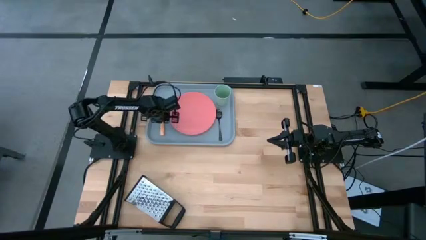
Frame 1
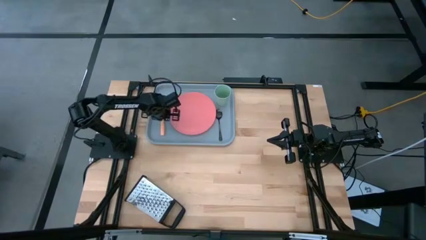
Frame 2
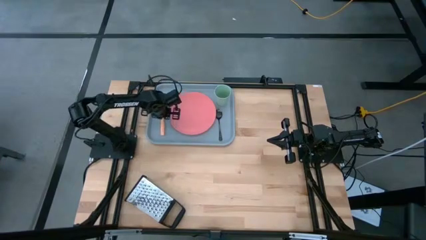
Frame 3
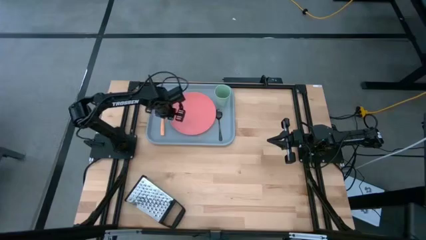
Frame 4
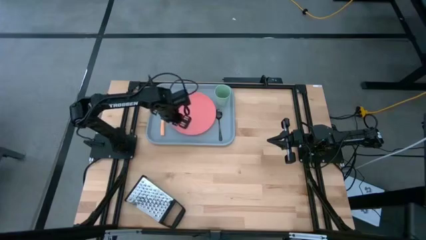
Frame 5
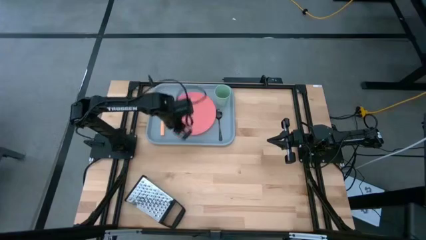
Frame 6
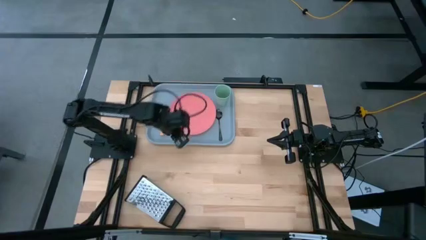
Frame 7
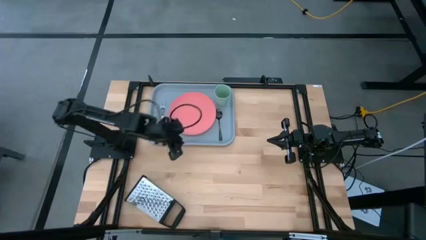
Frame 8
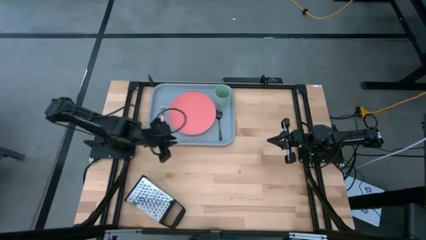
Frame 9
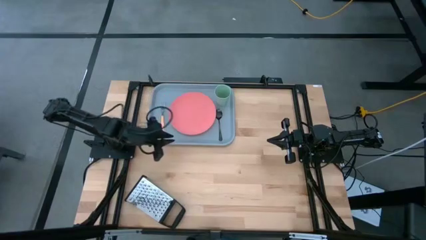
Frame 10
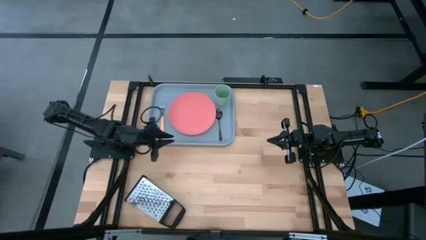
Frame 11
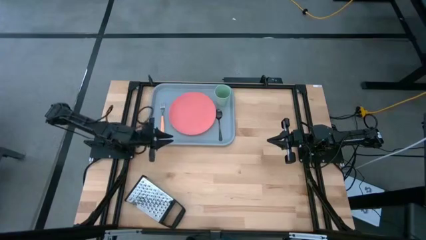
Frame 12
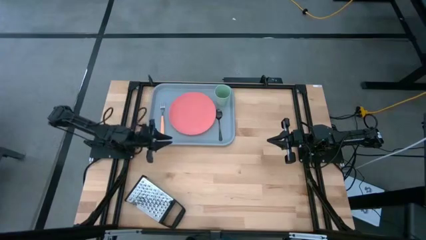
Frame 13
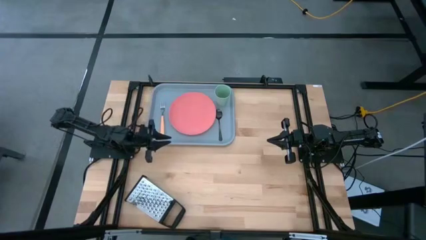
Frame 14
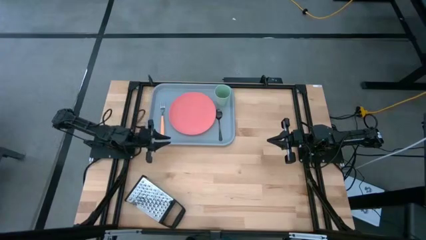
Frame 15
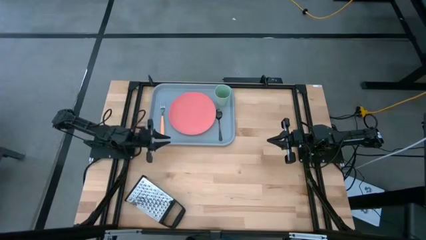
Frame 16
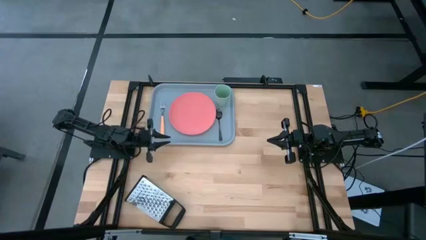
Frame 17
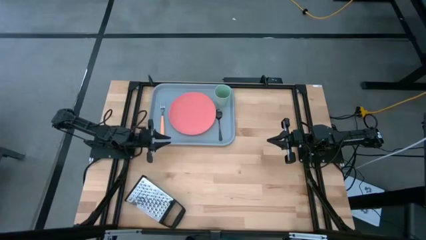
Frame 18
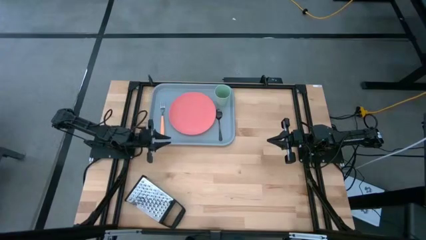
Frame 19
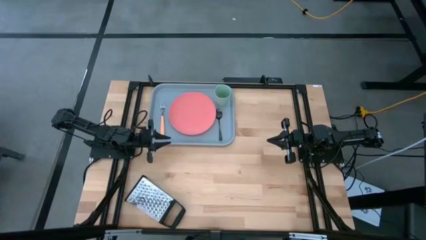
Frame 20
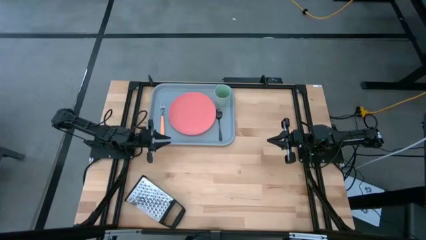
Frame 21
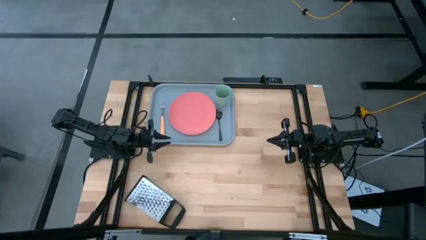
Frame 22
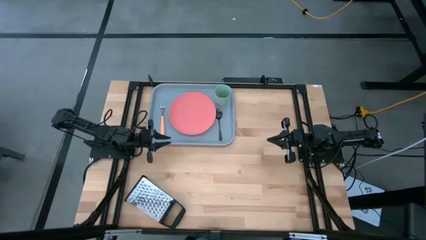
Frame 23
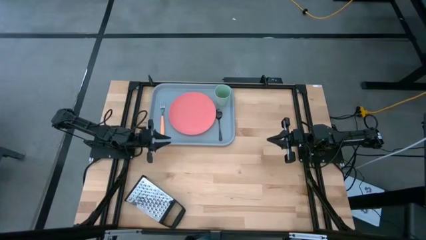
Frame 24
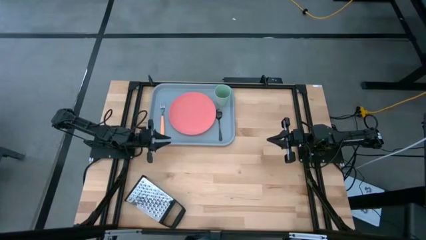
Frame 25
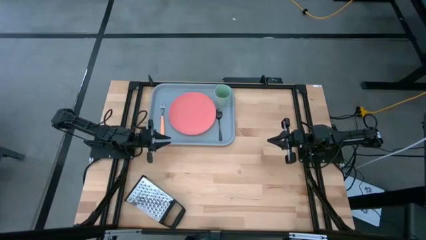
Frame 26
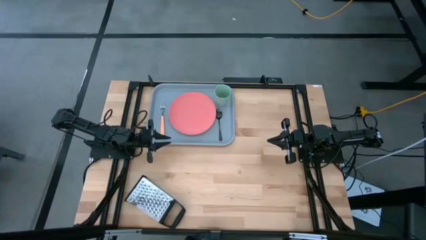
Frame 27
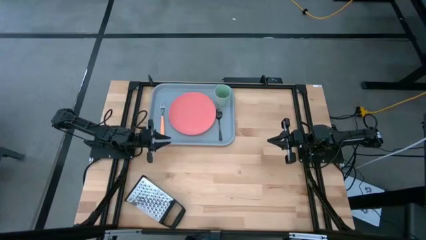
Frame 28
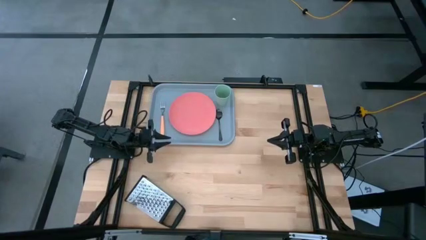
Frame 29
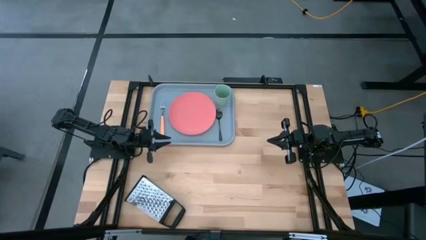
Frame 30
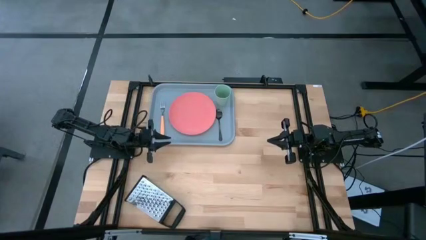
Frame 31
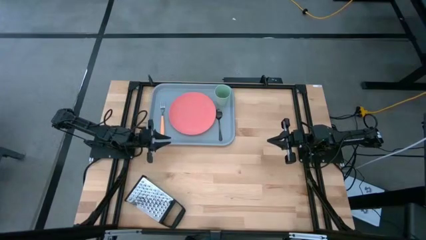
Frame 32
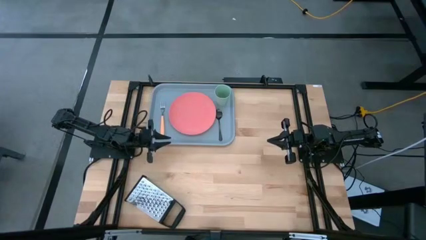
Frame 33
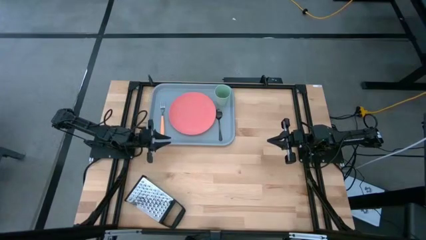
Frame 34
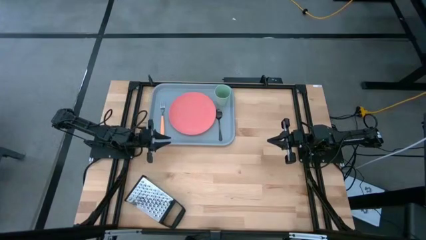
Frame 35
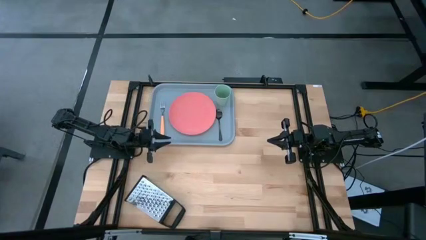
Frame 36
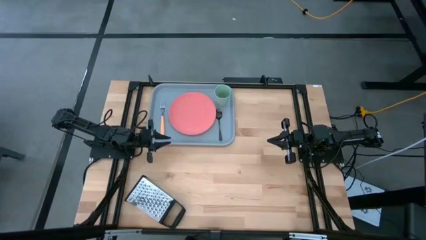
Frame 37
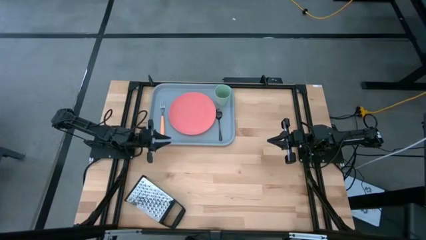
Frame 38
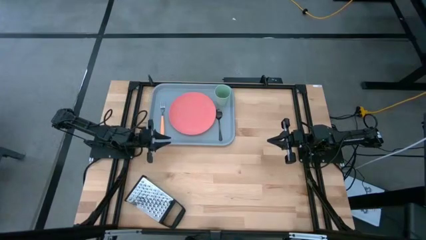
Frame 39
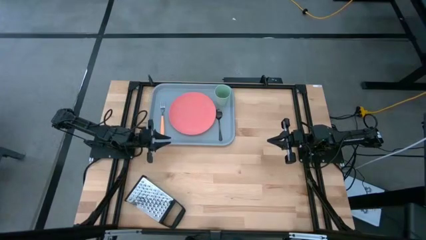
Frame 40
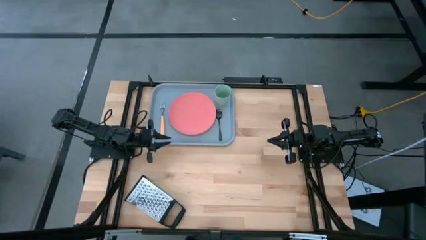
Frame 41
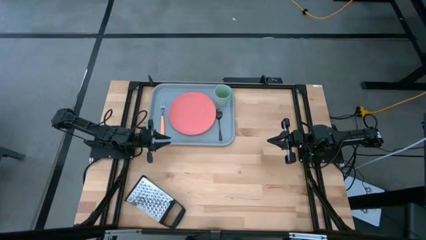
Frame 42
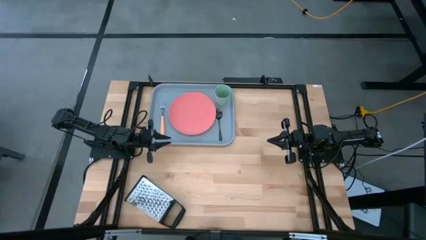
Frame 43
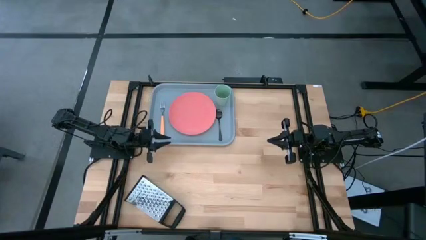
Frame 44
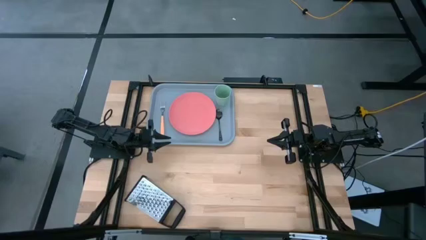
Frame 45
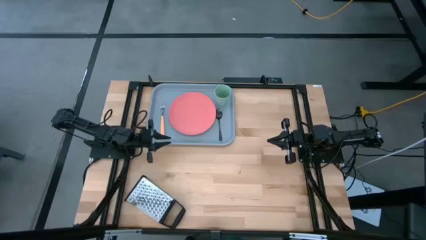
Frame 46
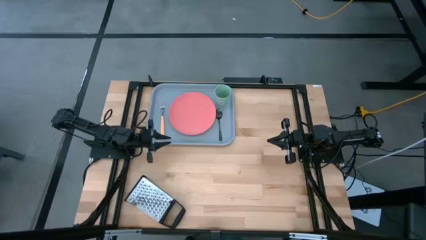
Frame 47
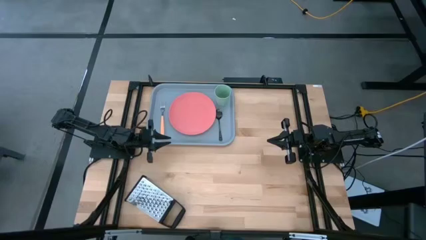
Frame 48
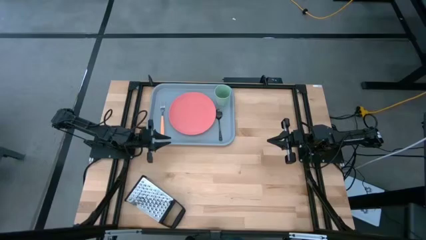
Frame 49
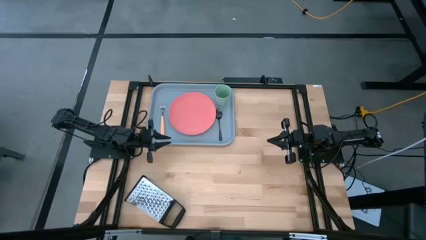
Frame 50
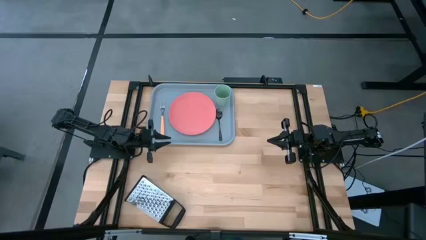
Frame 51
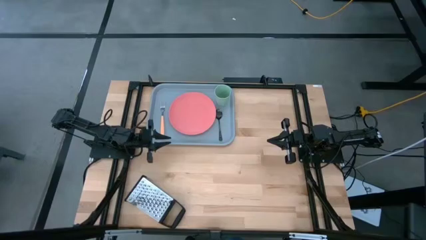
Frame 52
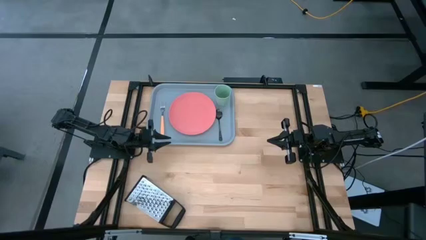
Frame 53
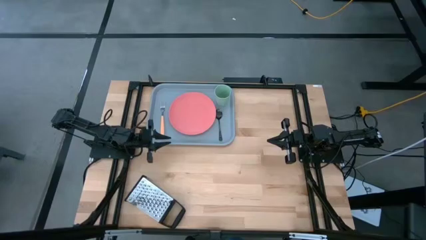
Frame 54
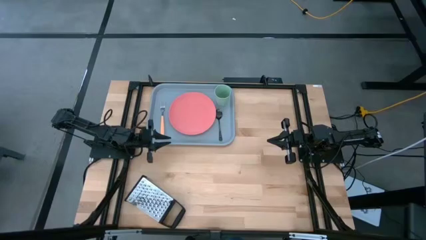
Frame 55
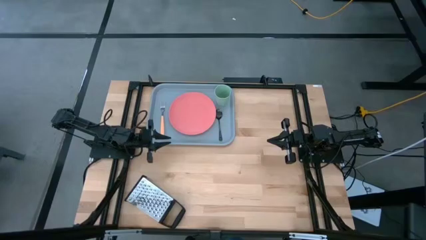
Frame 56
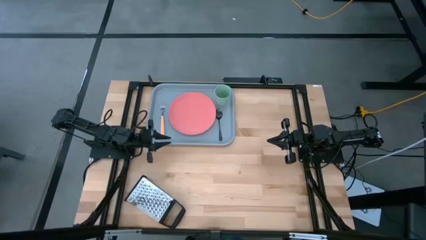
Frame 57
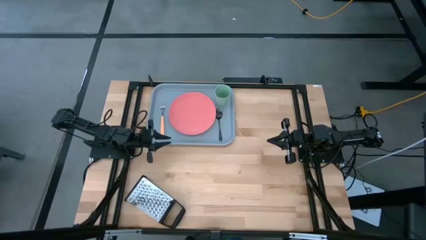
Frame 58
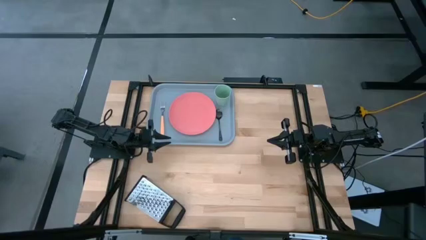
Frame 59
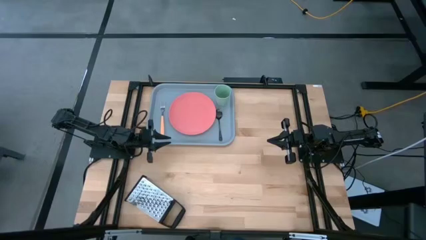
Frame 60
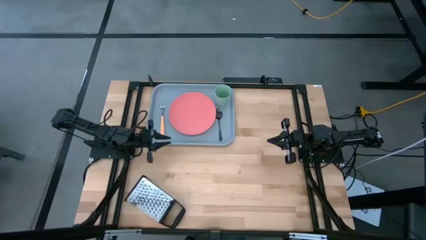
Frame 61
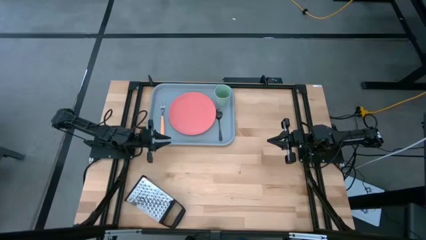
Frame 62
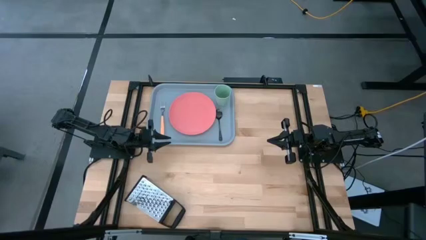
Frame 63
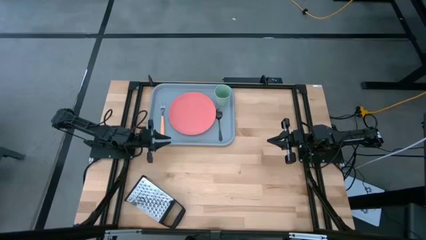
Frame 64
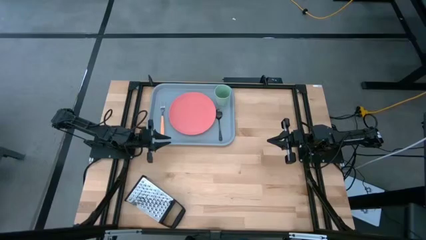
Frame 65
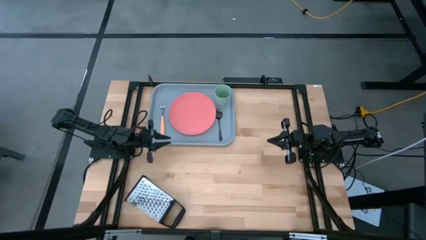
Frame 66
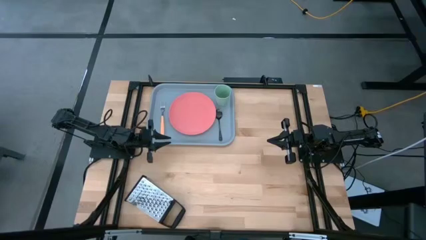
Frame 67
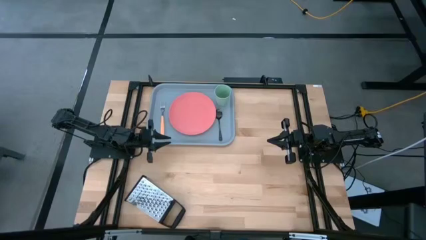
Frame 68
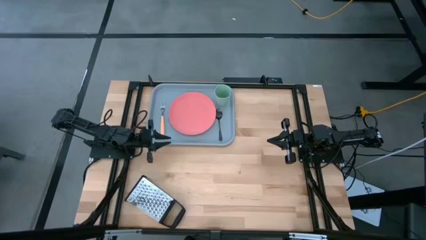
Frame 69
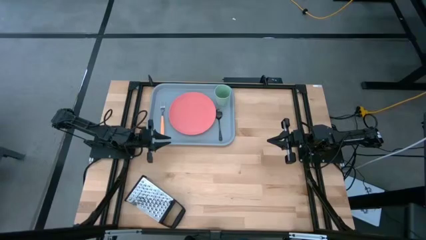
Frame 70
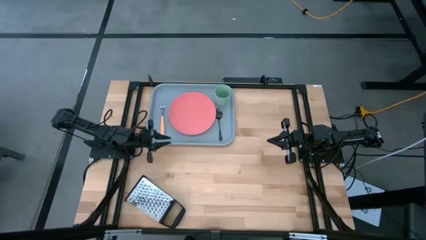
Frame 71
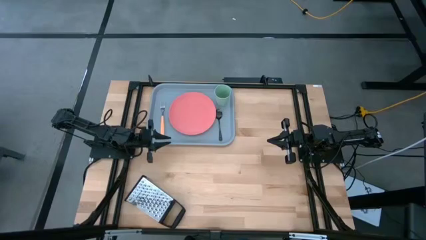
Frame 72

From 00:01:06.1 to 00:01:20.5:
Task: Pick and place plate/cup/fork/spoon on tray
Return to Home Position
